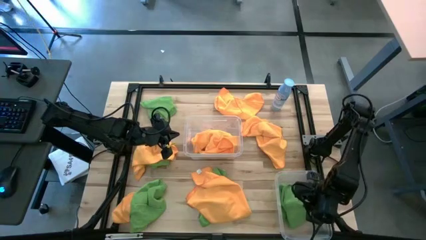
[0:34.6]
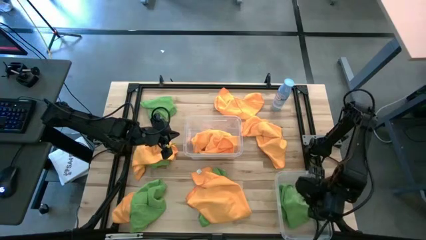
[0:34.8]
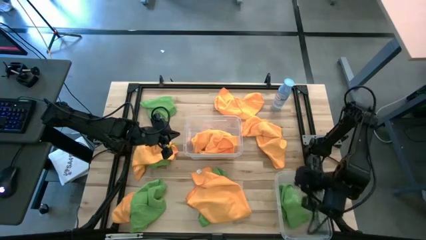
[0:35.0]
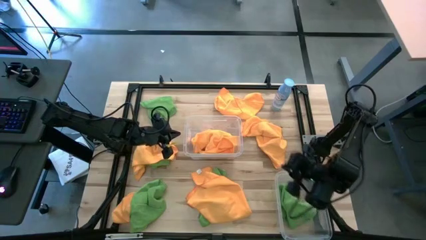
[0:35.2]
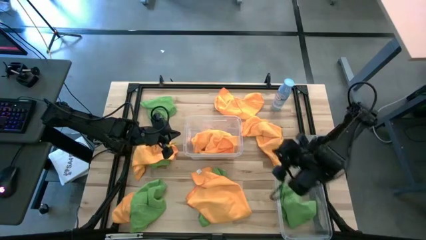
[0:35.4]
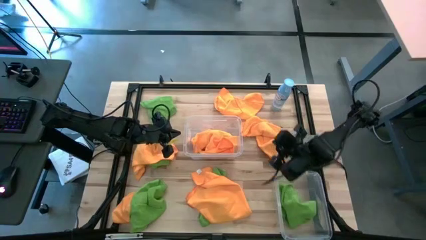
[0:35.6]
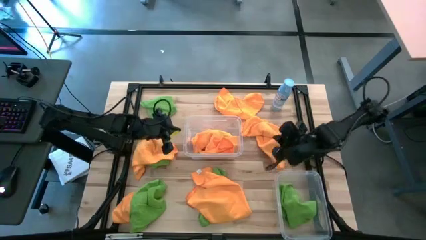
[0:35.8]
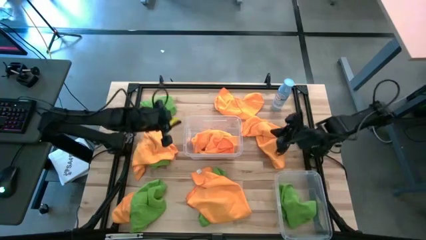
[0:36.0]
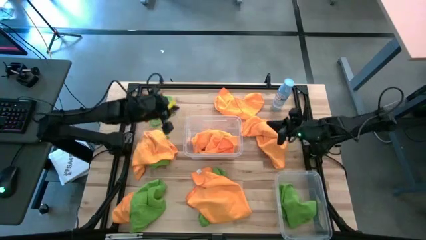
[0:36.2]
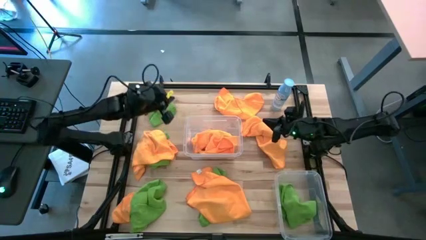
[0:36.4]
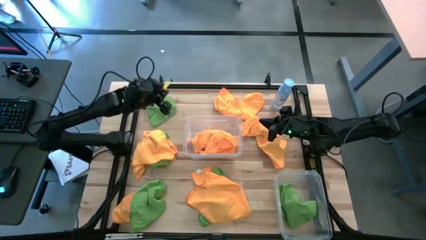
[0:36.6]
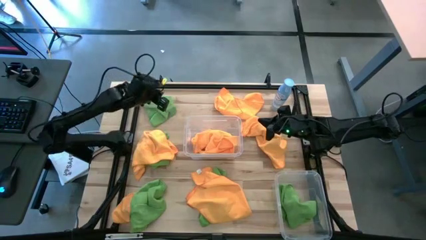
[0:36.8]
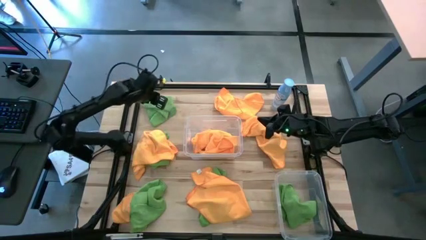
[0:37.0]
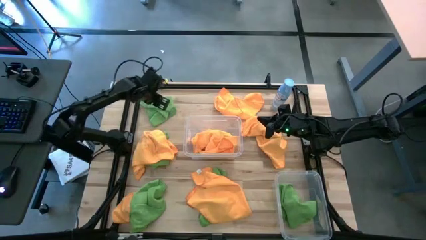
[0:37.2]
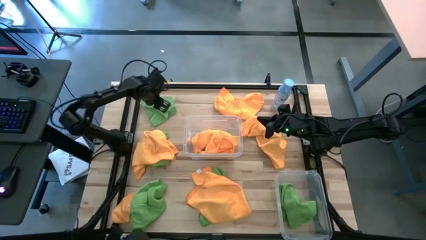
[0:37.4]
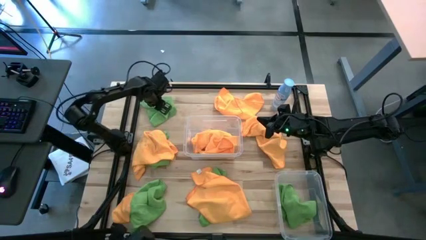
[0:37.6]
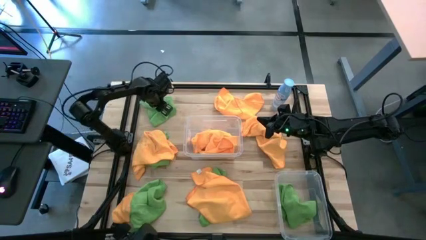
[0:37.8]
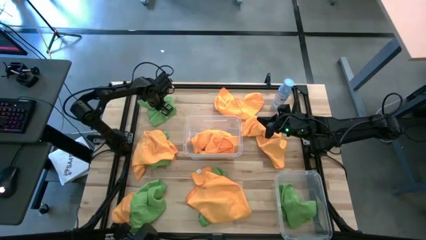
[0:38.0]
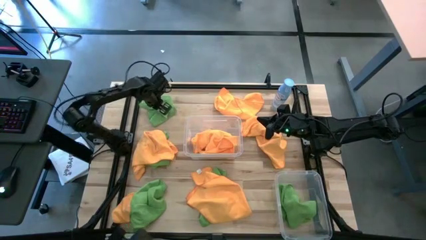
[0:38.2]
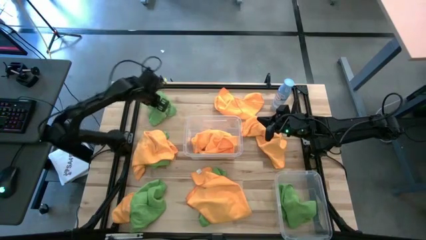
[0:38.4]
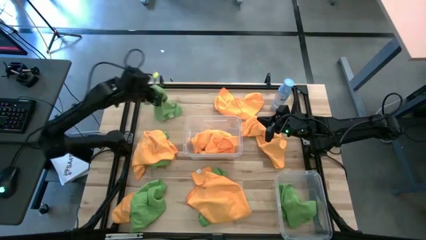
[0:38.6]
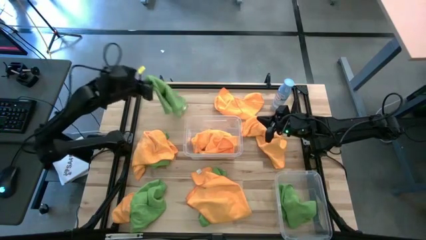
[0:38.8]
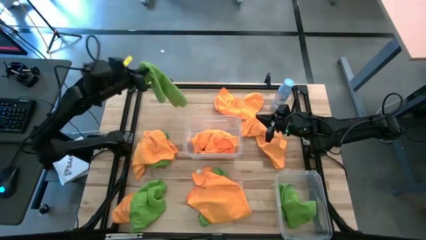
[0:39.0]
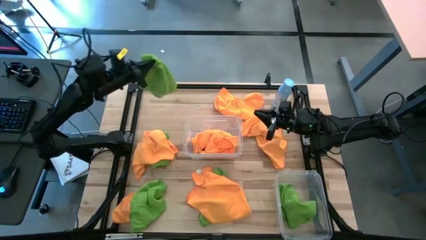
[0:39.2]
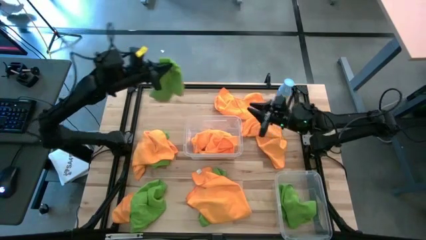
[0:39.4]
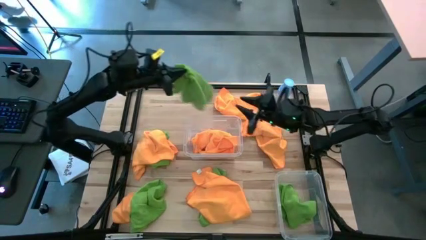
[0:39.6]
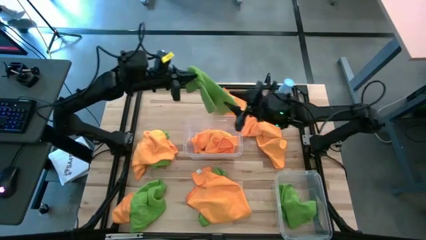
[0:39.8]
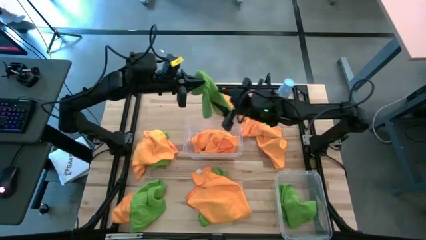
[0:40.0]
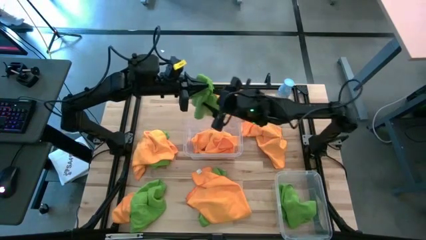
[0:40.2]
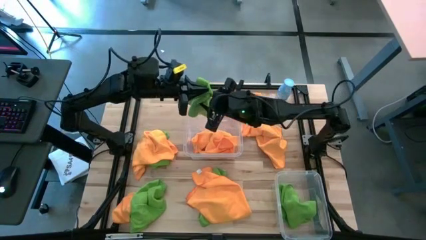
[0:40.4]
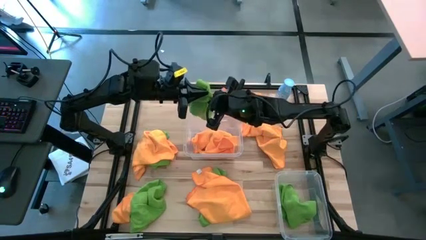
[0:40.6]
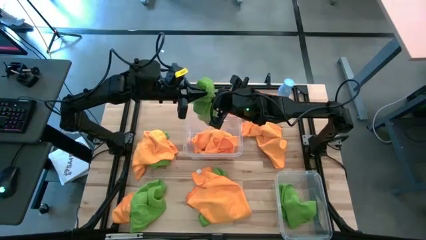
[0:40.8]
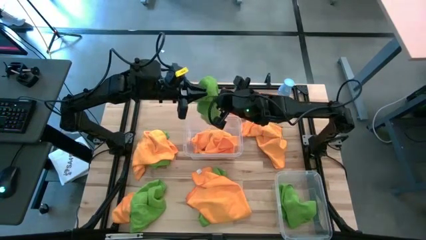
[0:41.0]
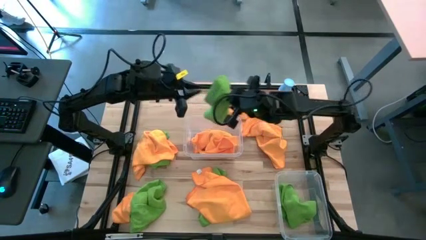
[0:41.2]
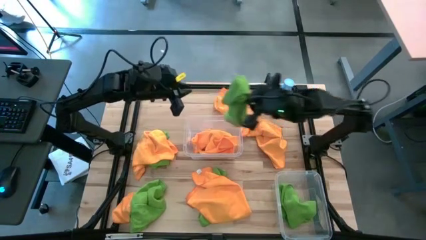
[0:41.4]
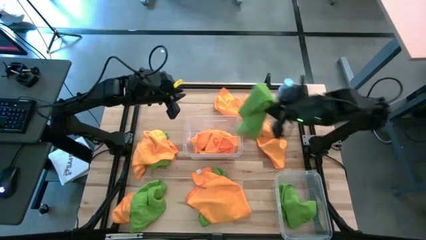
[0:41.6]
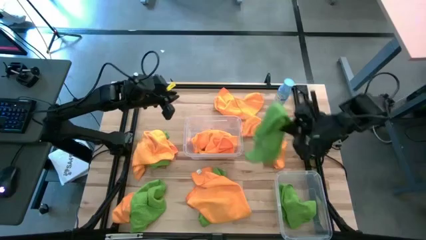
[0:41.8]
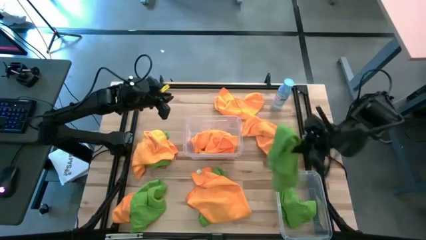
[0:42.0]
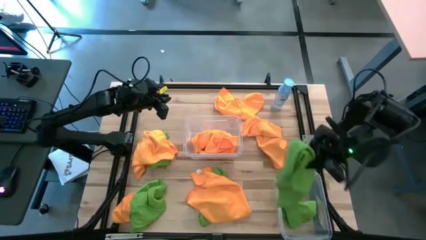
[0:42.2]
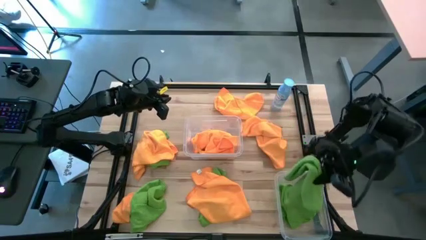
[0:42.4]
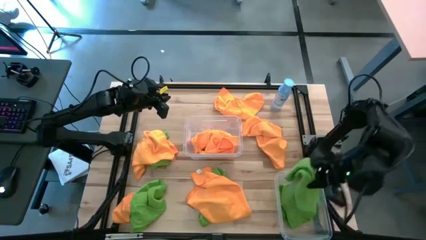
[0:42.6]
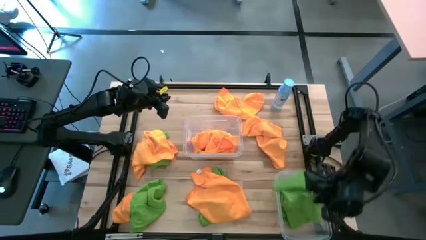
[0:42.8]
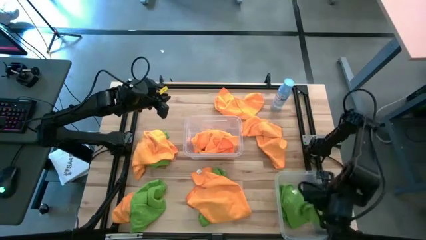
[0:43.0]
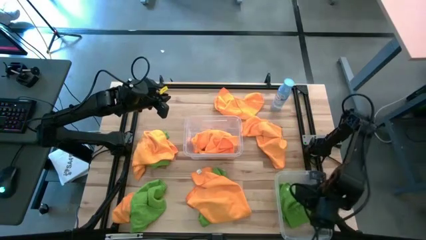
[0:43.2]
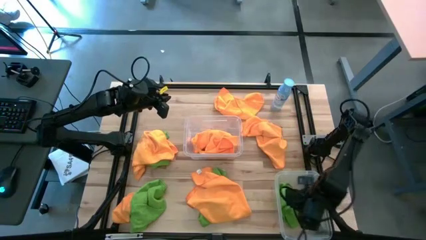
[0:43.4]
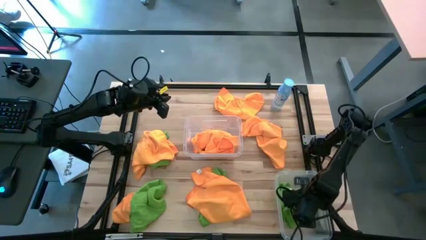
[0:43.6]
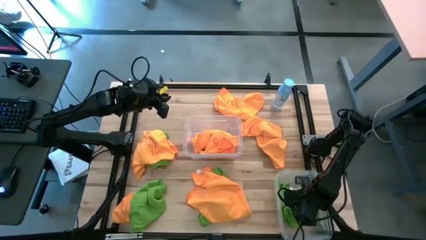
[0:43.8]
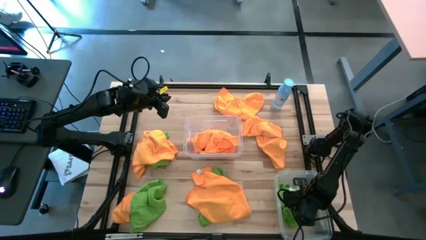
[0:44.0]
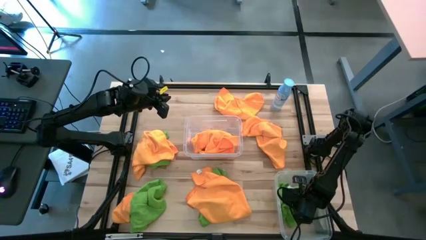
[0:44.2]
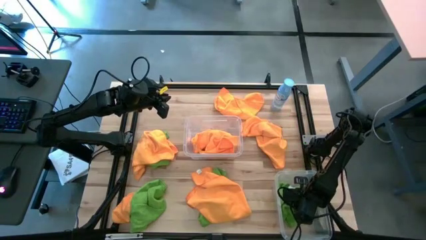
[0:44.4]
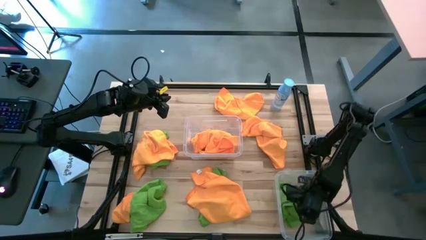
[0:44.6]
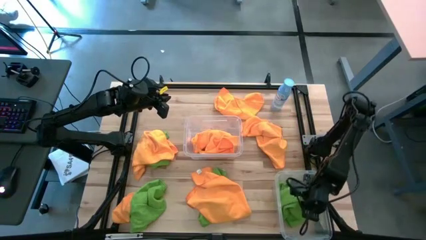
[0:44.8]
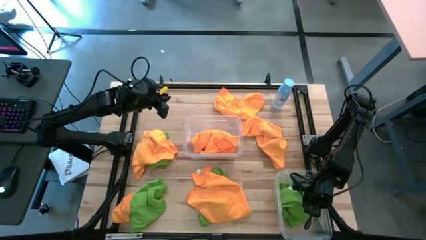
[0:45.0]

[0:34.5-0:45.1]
Task: Sort microfiber towel by color & place in baskets
Put the green microfiber cloth into the bottom transparent bin

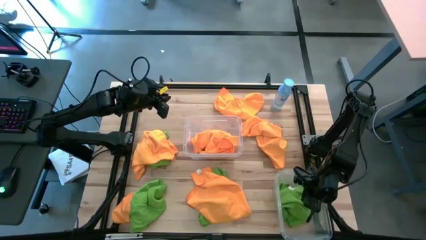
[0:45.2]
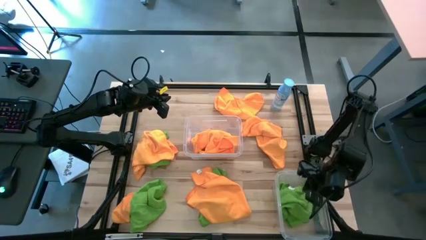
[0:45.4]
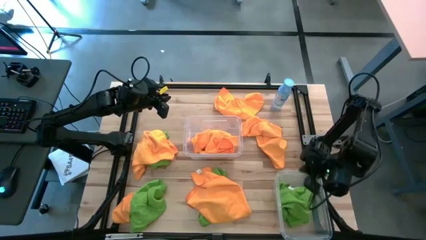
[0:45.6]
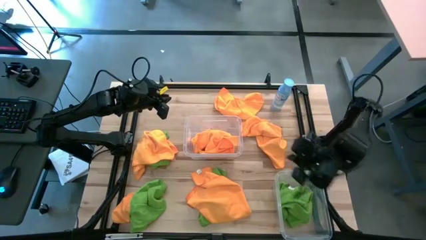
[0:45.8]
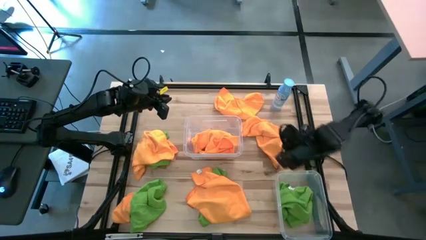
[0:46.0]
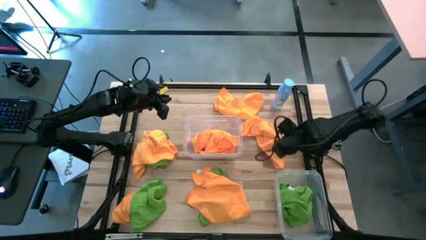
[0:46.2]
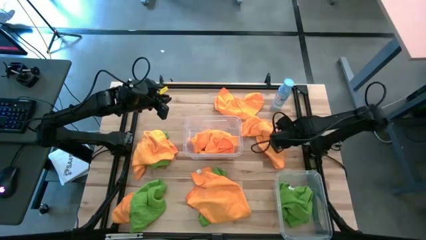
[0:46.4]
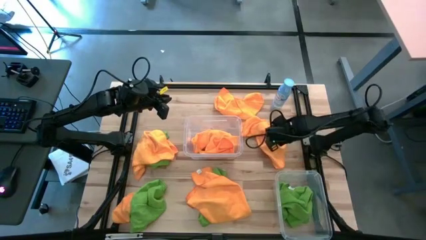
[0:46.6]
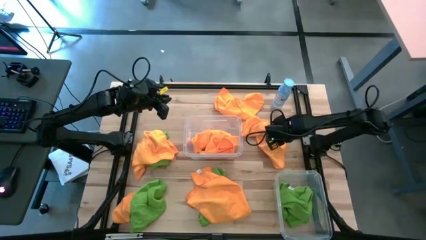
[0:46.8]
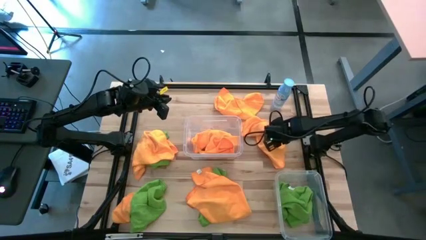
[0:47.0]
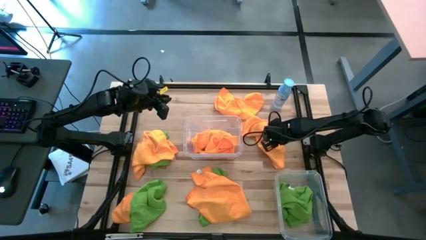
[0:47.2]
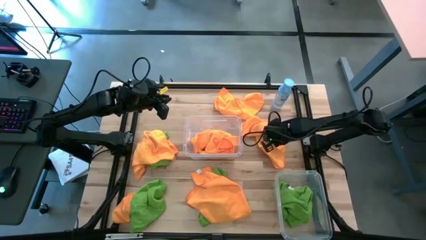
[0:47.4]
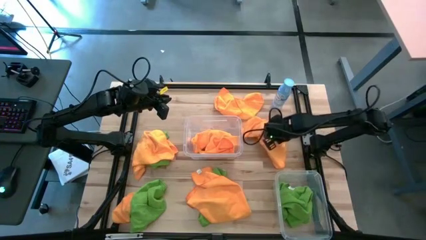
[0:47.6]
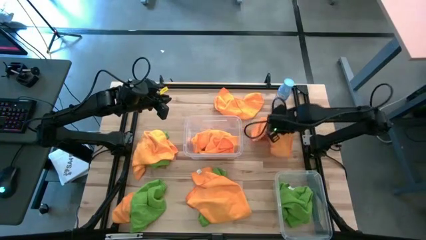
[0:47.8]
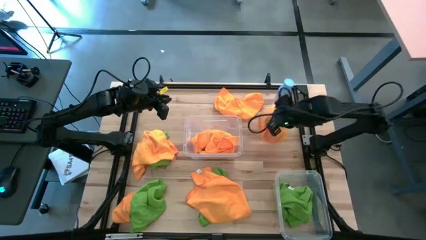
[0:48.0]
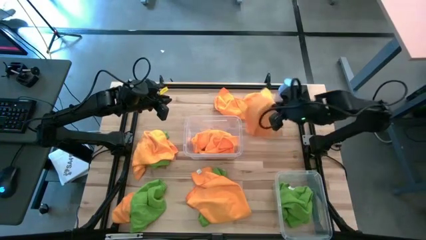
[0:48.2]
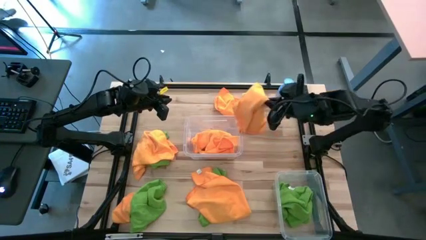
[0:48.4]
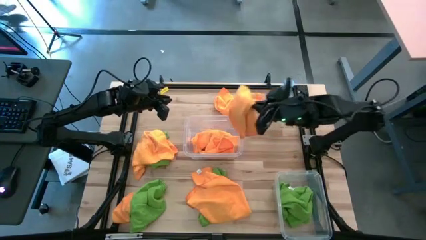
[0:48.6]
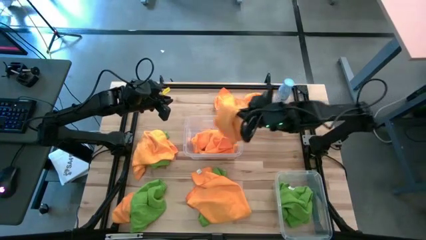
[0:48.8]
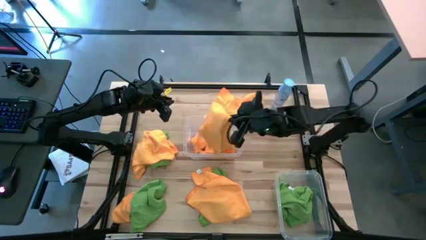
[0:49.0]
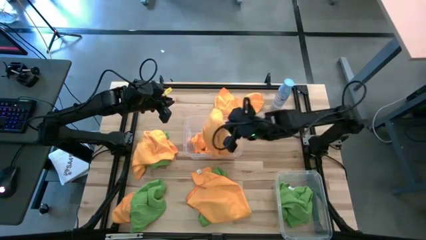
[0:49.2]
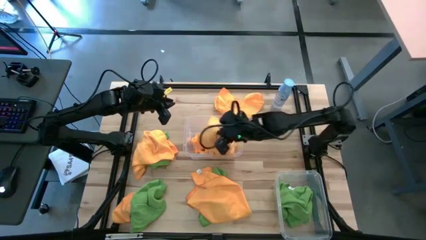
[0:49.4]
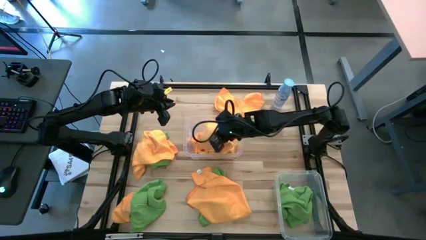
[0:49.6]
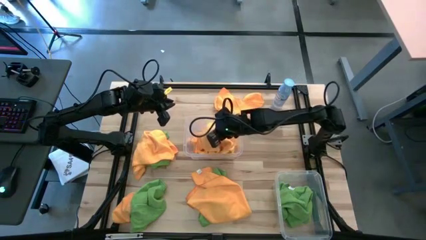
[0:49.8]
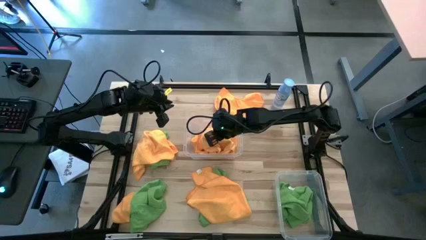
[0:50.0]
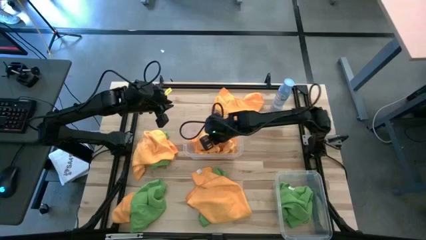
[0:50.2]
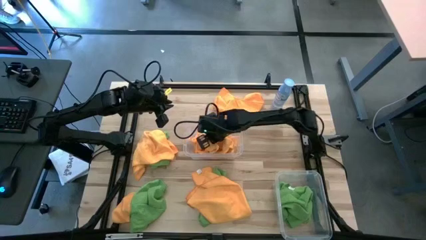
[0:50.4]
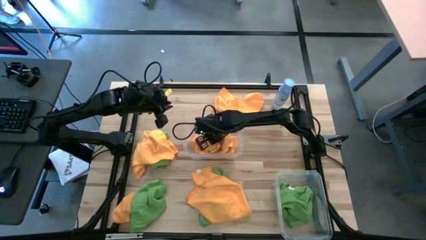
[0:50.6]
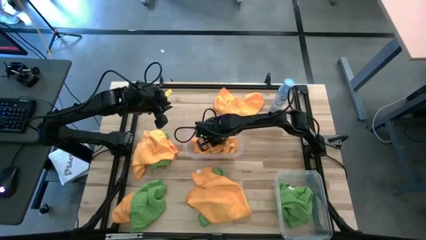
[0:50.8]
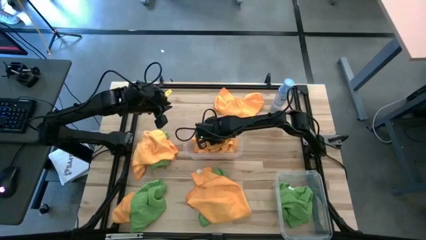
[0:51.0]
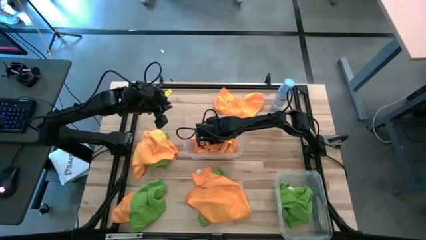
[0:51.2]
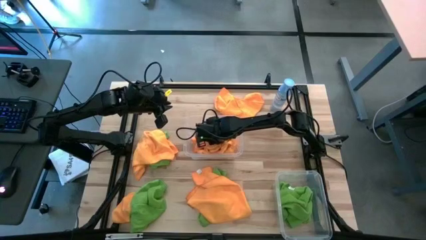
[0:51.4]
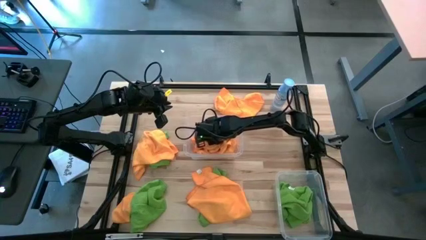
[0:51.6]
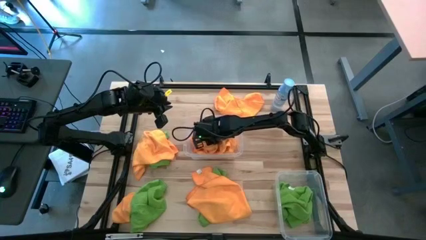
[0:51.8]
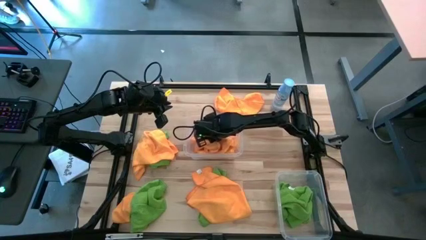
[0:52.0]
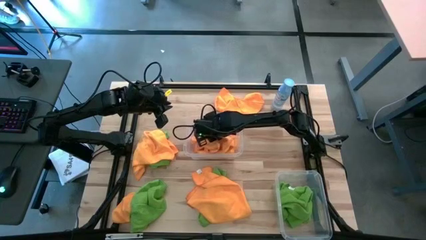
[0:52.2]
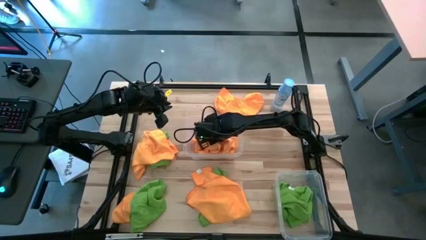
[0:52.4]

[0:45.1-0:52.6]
Put the yellow microfiber cloth into the top transparent bin
